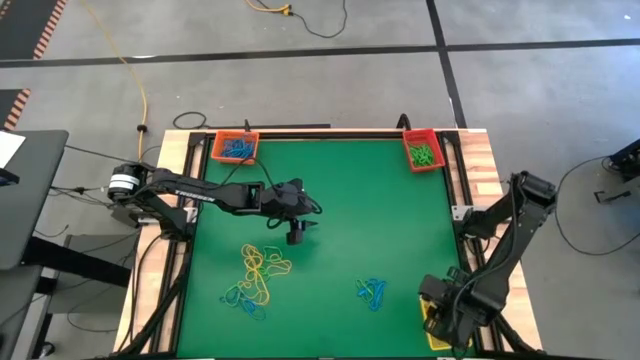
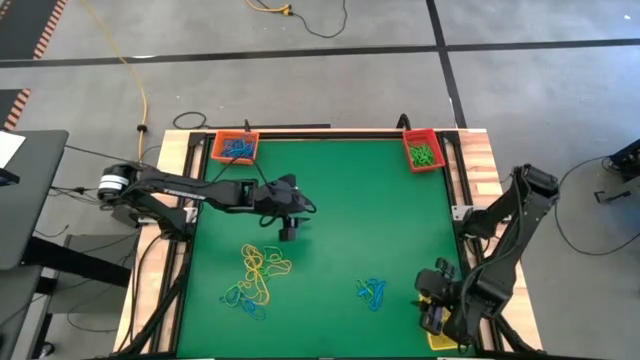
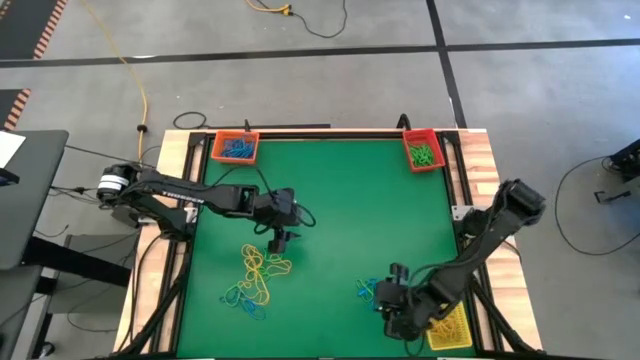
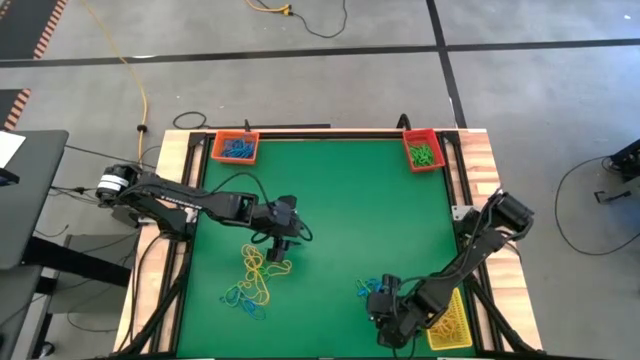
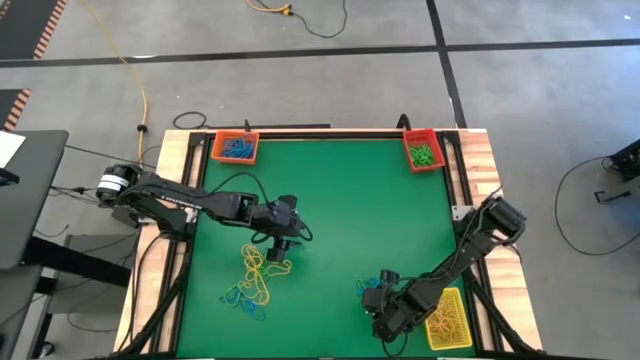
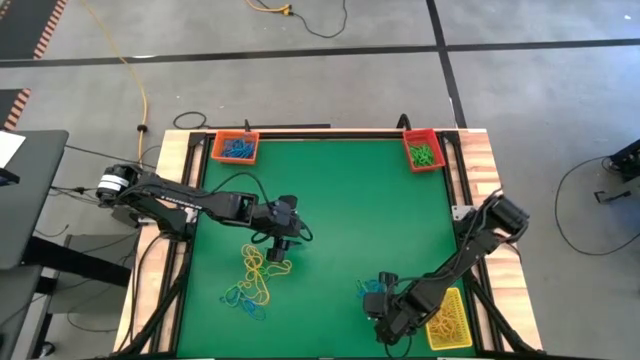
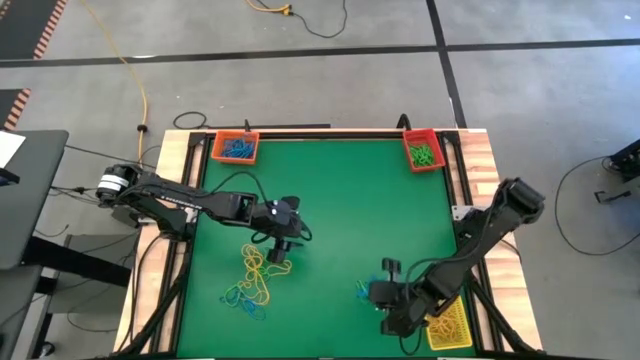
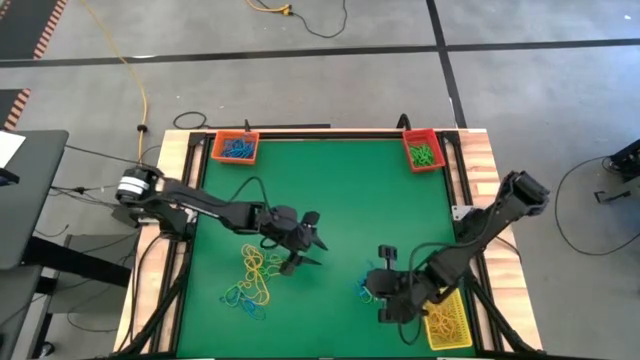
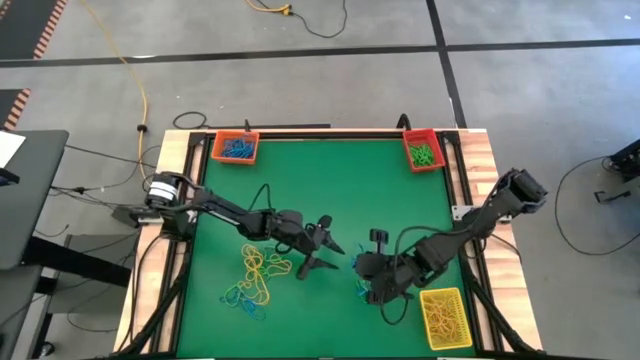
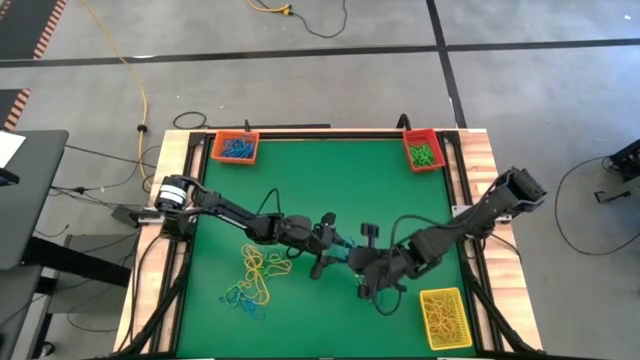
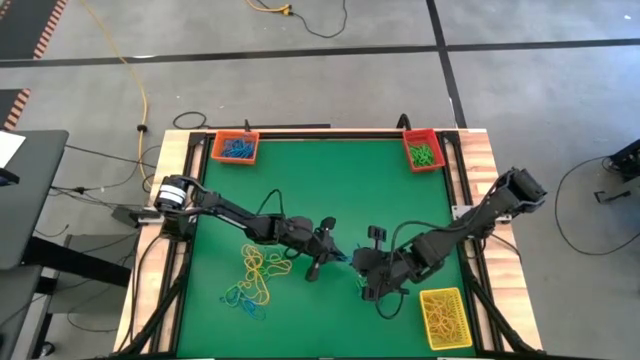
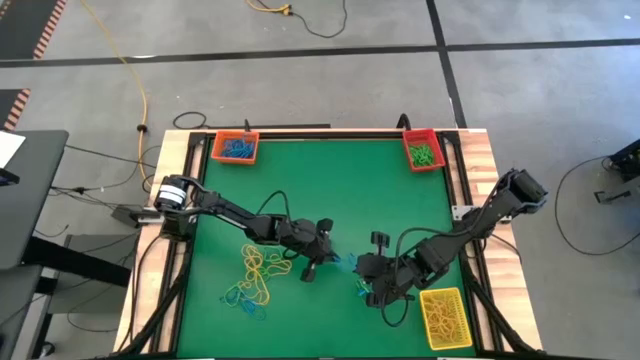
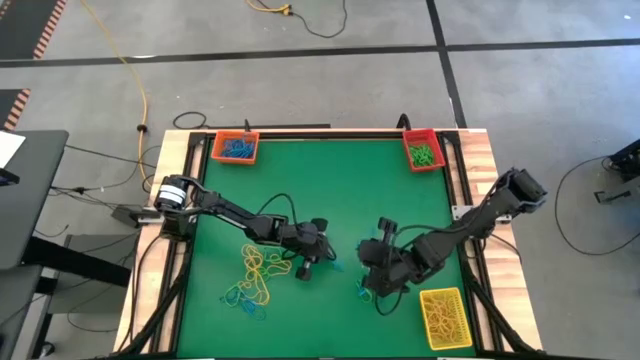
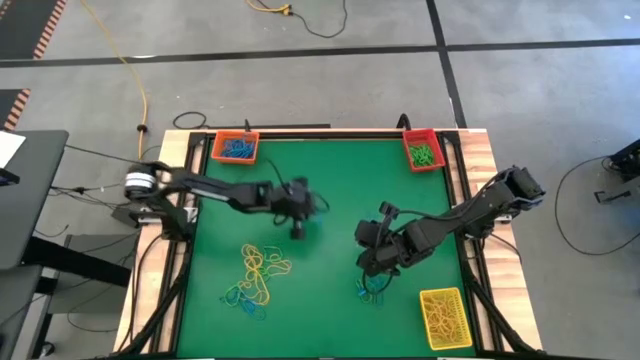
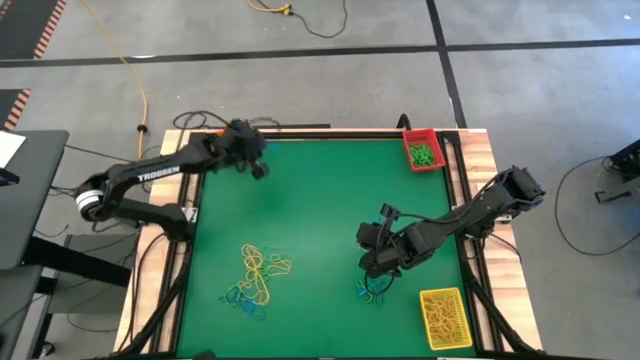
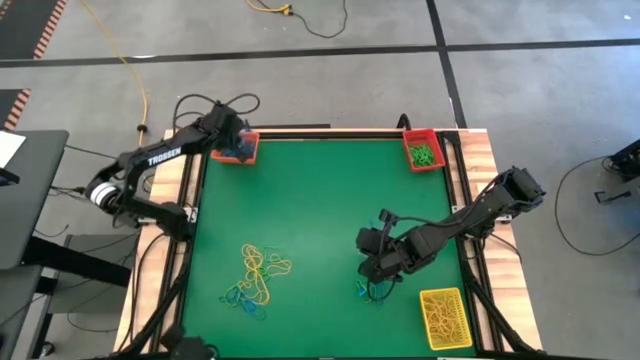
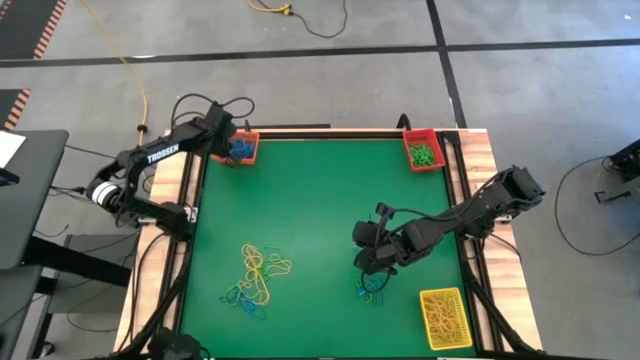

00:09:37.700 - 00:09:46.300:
Task: Sort rubber bands into baskets
Put the right blue rubber band into the orange bin

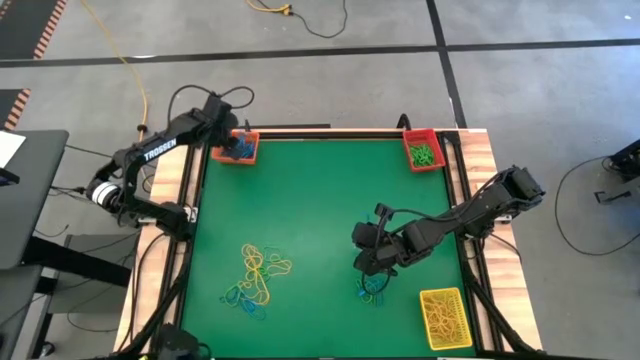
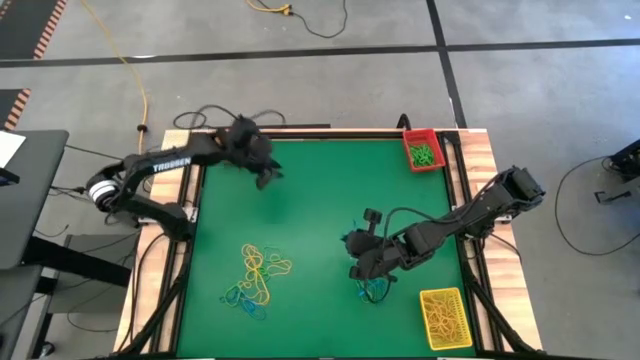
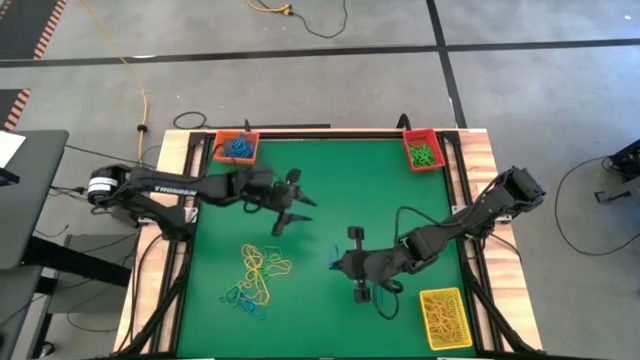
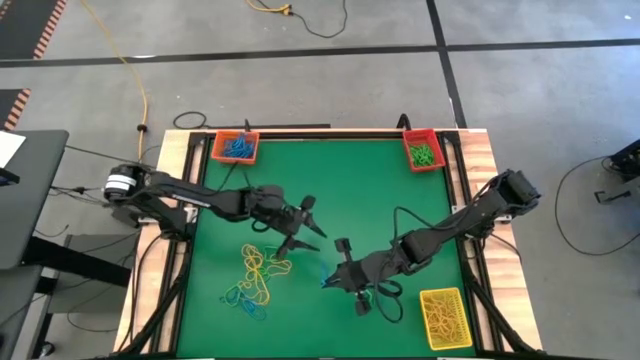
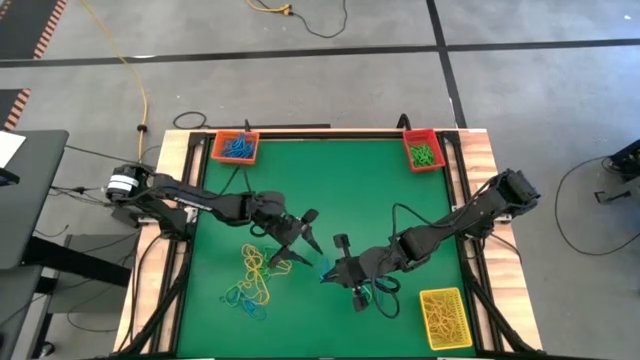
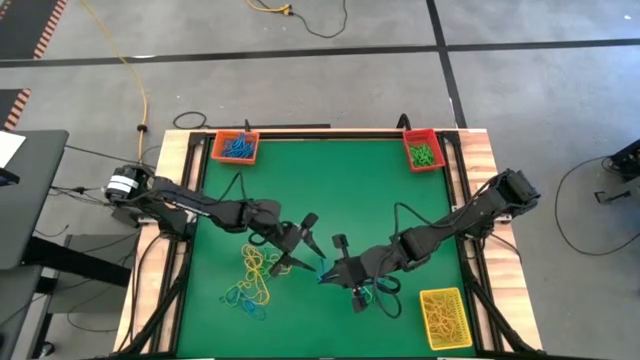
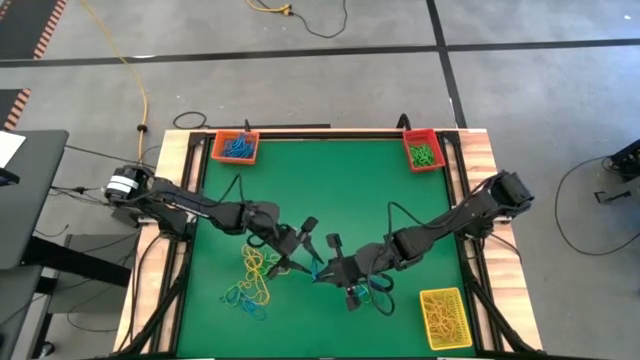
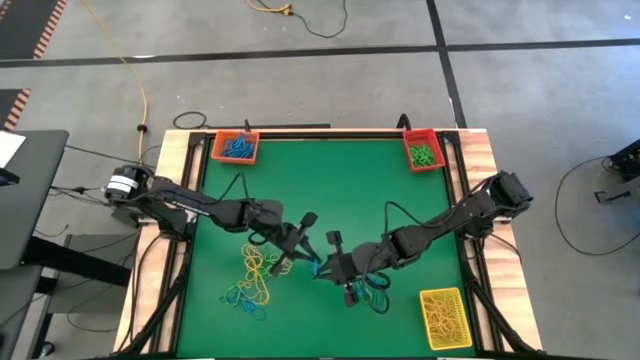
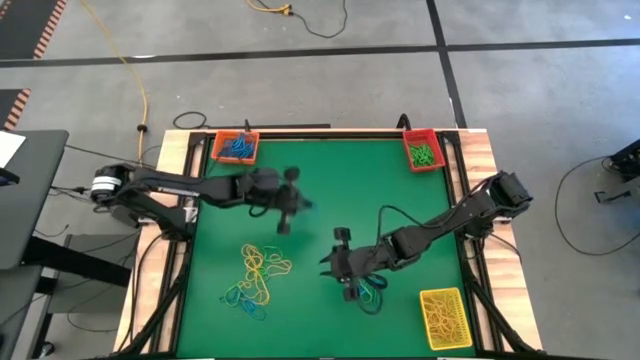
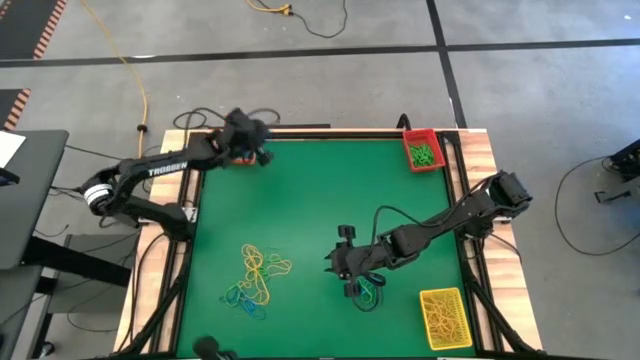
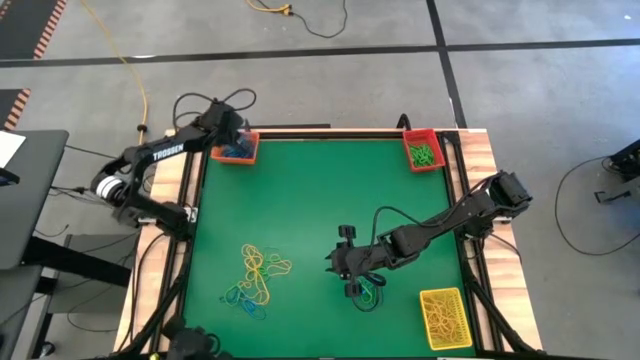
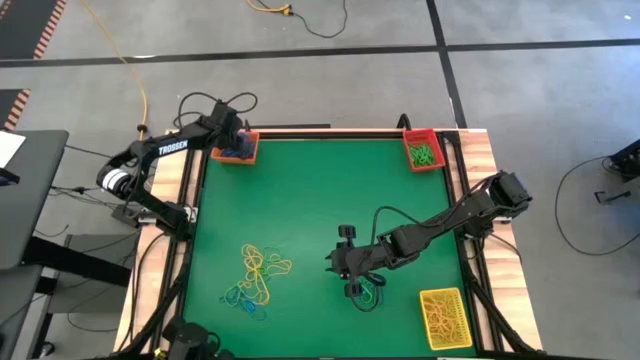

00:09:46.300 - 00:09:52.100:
Put the right blue rubber band into the orange bin

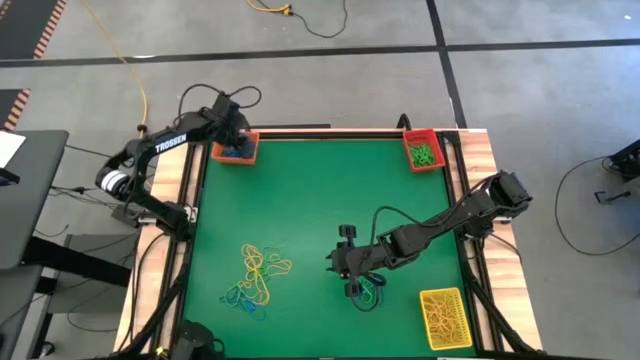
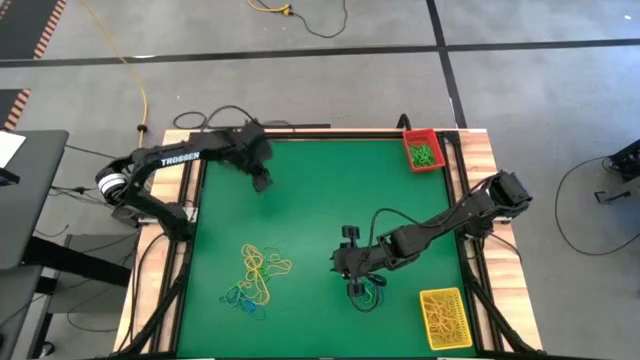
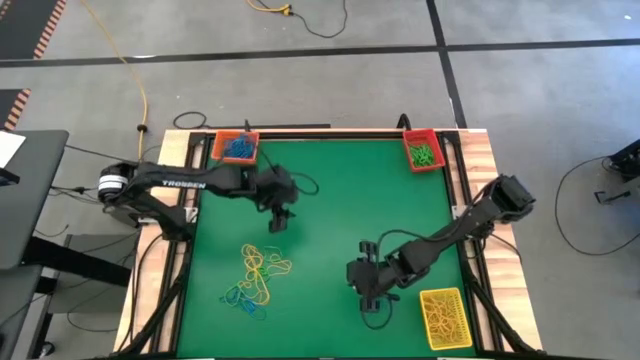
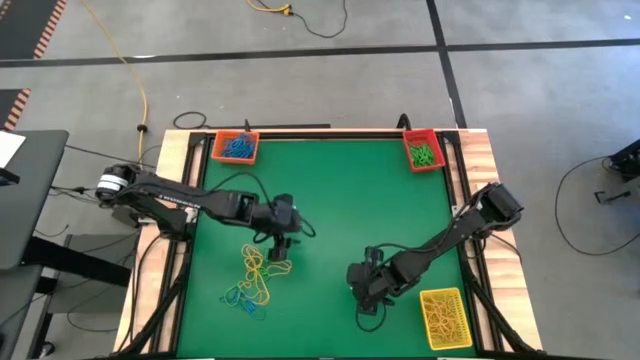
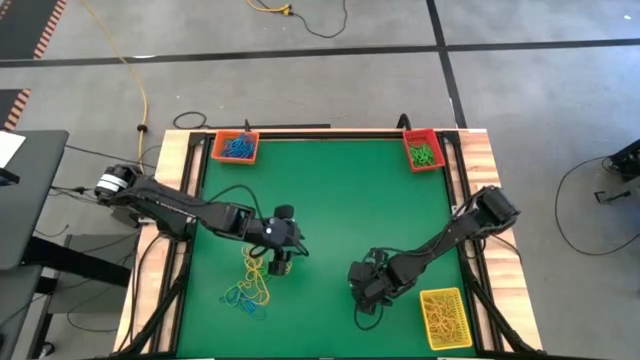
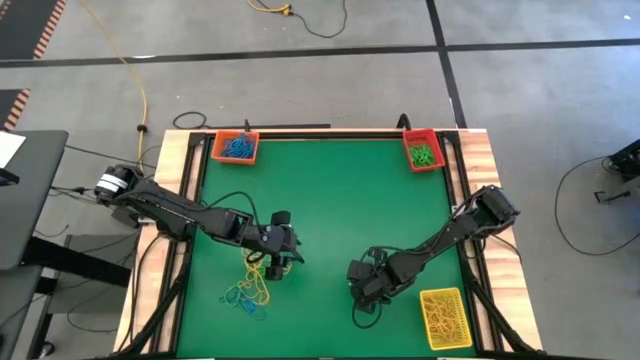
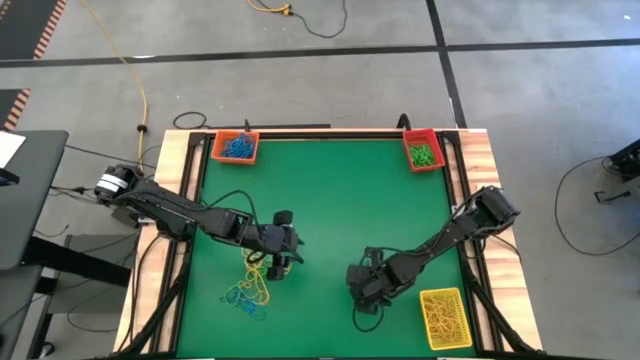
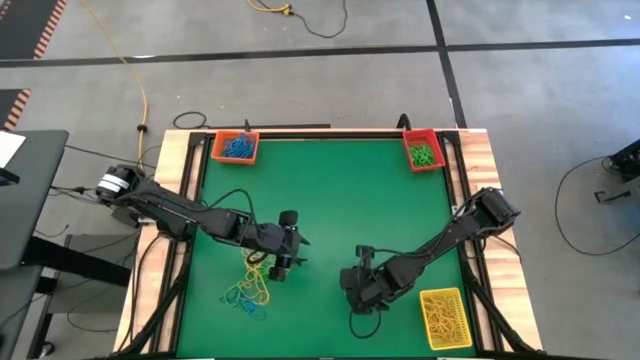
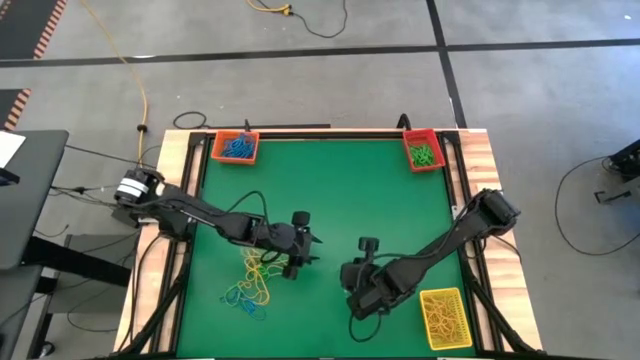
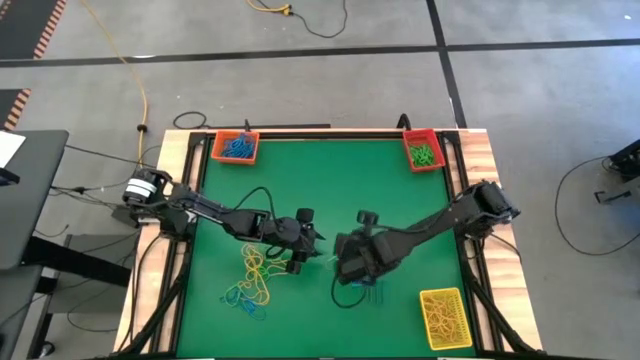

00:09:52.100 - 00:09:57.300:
Put the right green rubber band into the red bin

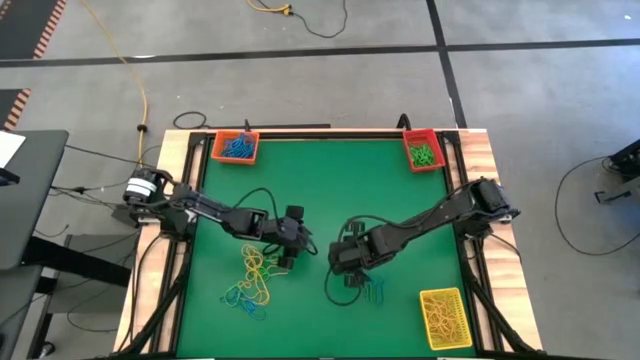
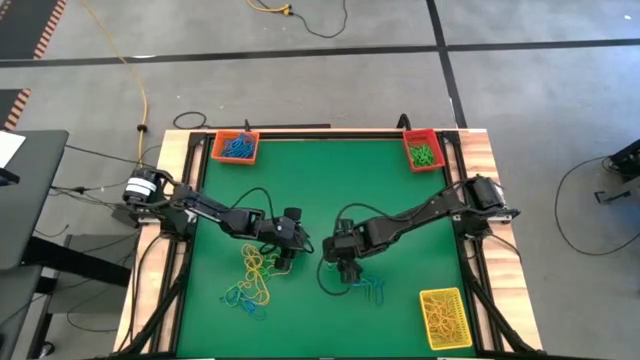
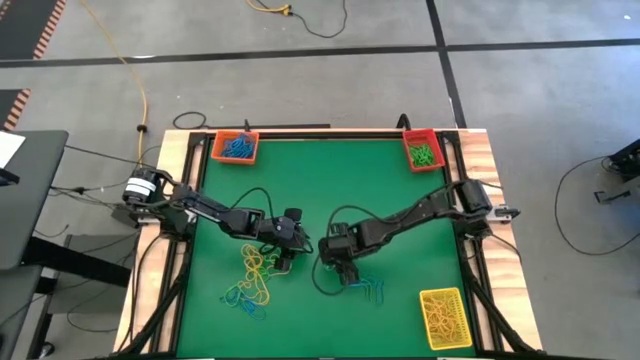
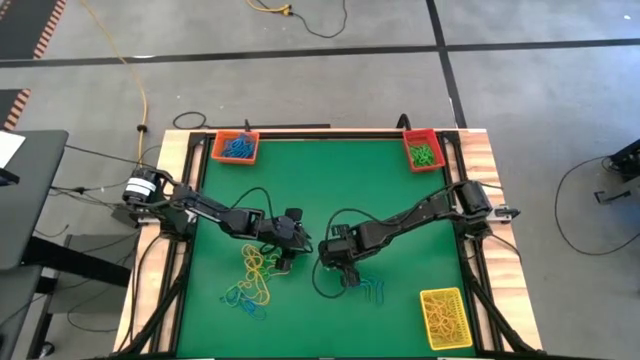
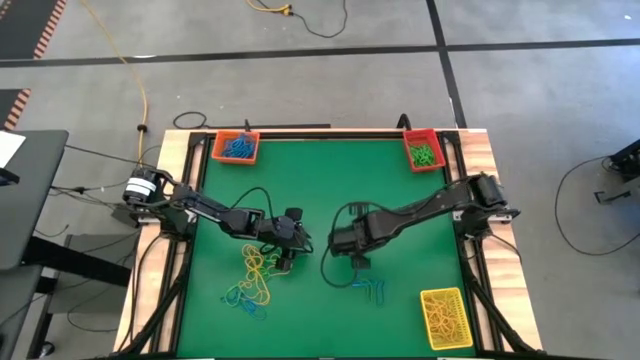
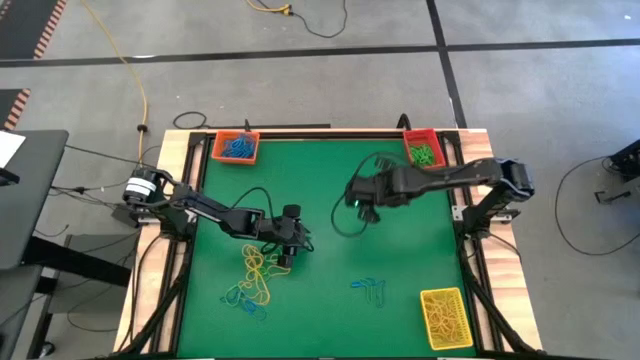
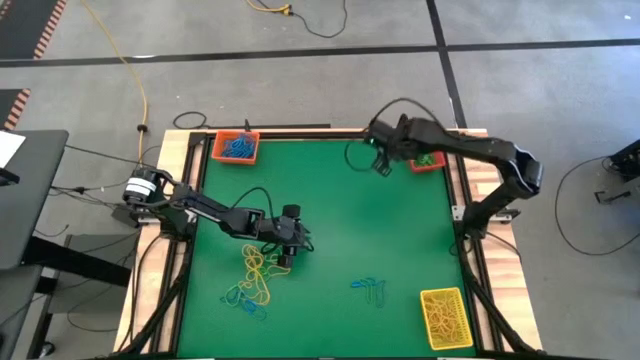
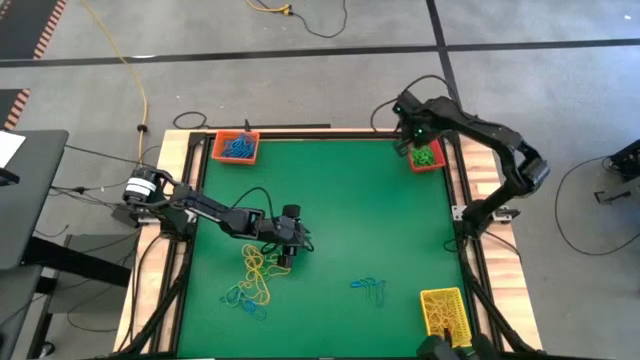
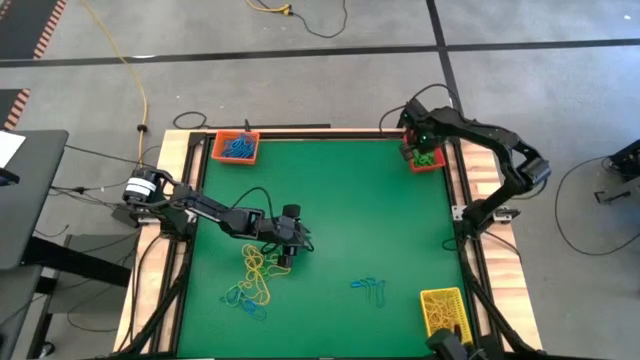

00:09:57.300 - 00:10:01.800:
Put the right green rubber band into the red bin
